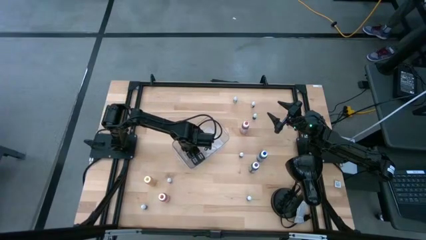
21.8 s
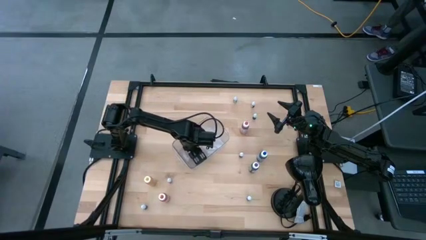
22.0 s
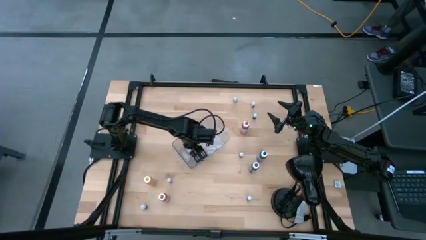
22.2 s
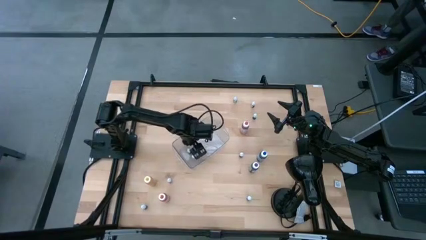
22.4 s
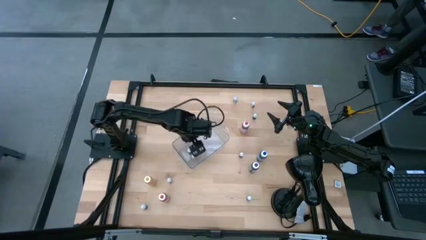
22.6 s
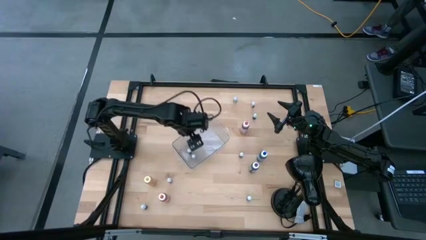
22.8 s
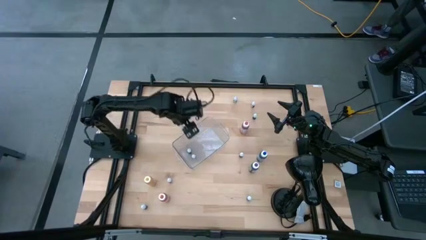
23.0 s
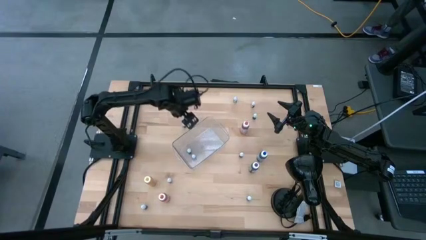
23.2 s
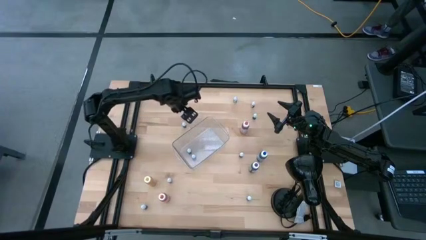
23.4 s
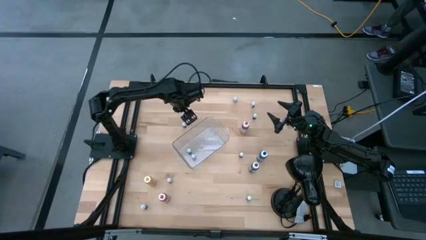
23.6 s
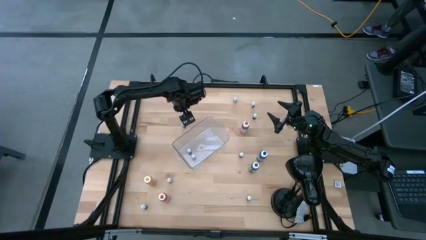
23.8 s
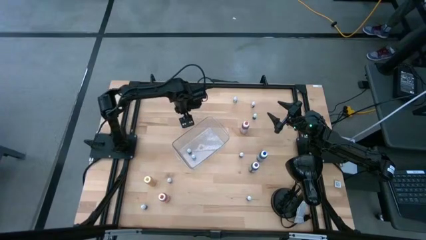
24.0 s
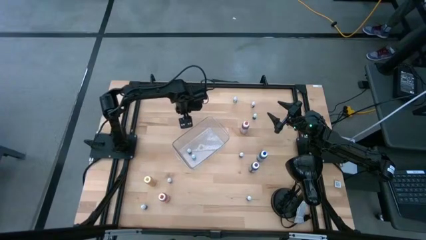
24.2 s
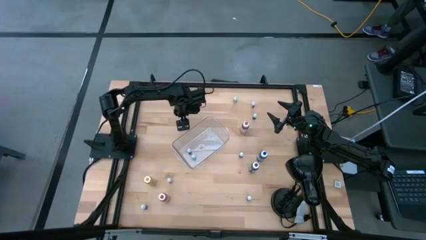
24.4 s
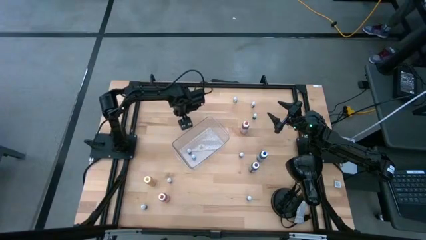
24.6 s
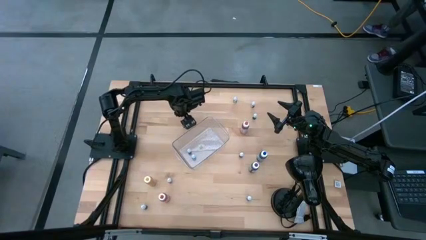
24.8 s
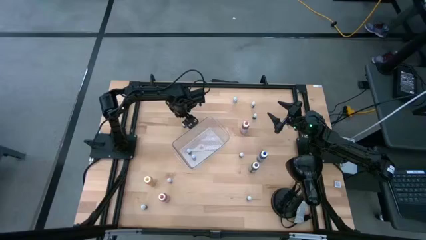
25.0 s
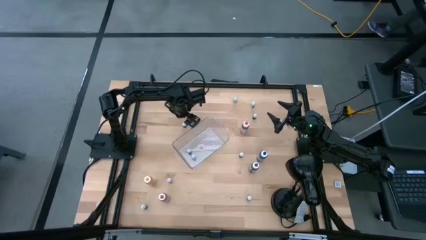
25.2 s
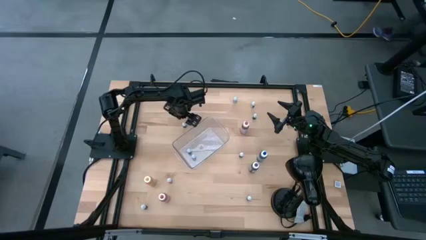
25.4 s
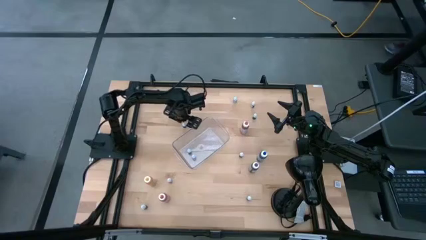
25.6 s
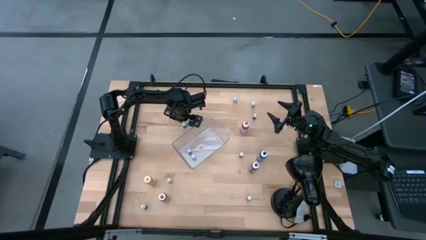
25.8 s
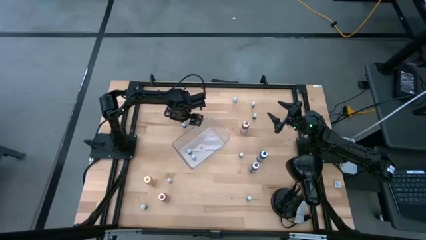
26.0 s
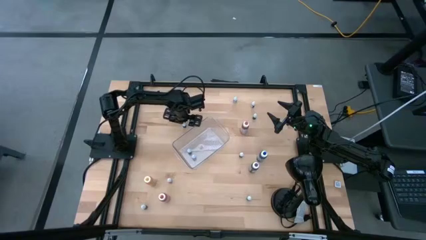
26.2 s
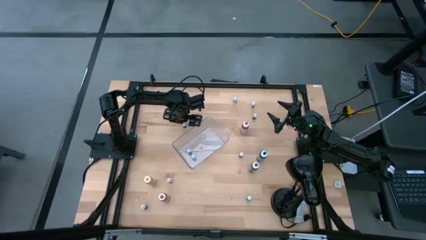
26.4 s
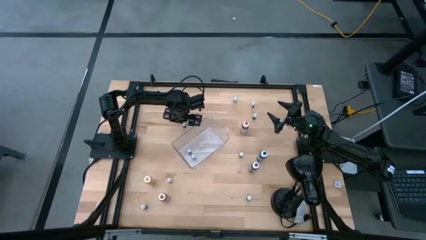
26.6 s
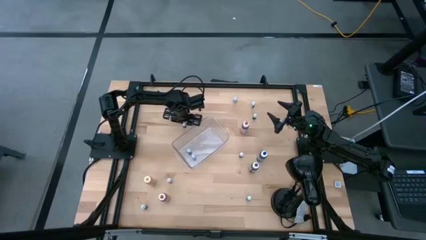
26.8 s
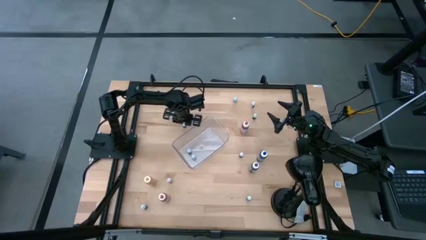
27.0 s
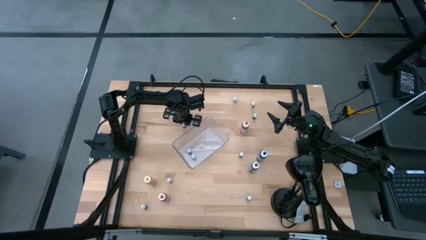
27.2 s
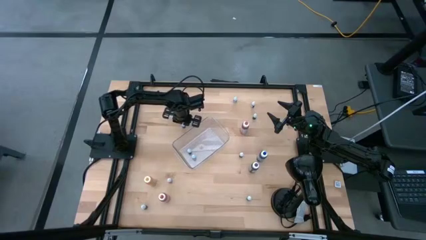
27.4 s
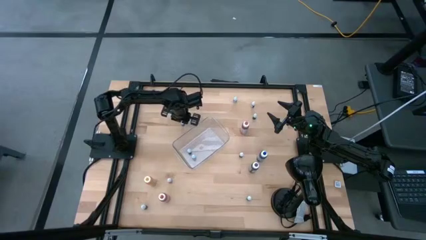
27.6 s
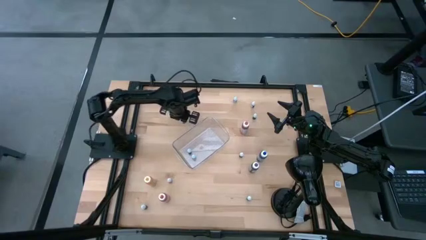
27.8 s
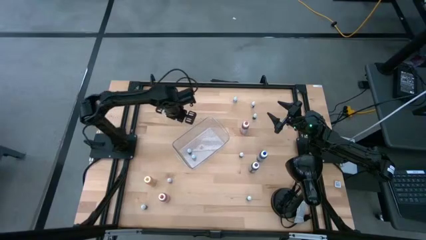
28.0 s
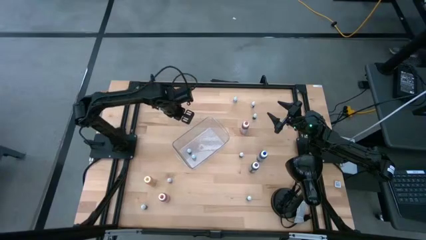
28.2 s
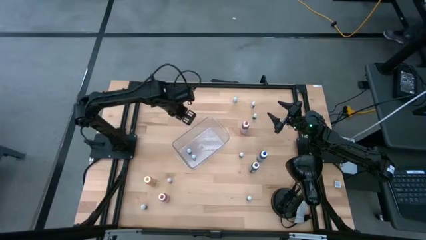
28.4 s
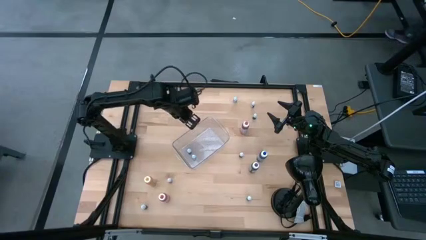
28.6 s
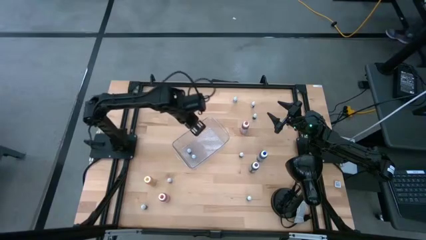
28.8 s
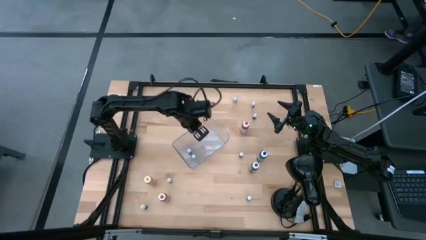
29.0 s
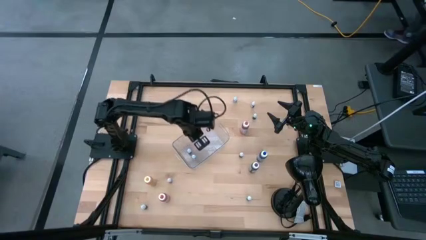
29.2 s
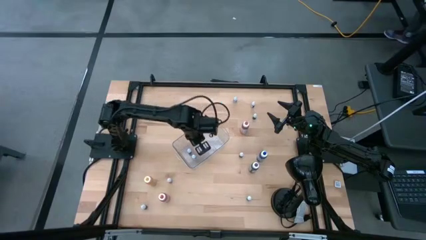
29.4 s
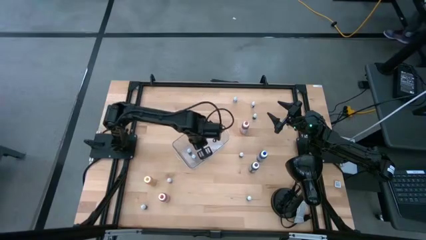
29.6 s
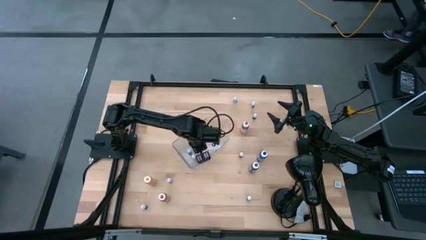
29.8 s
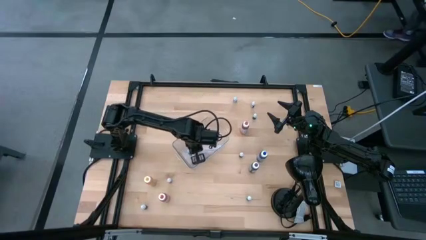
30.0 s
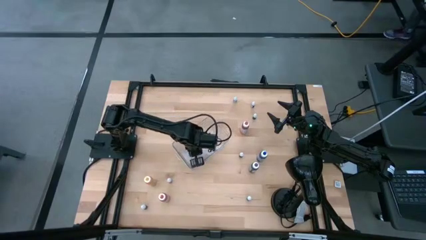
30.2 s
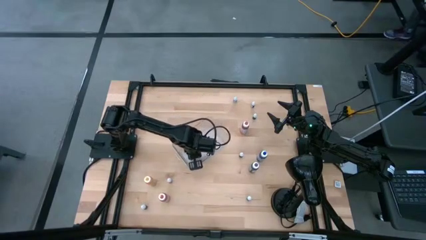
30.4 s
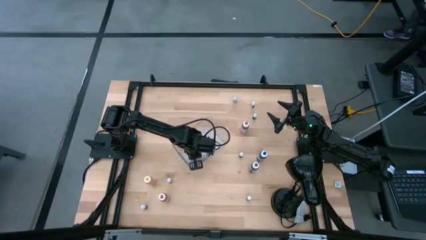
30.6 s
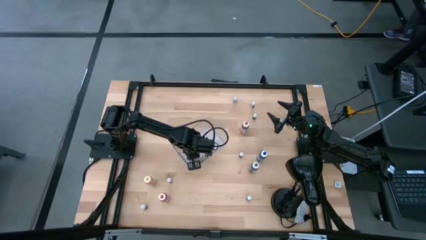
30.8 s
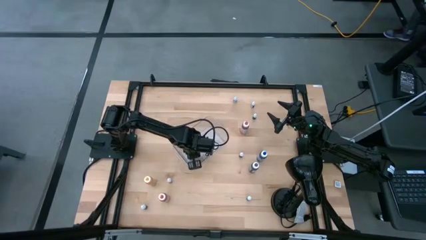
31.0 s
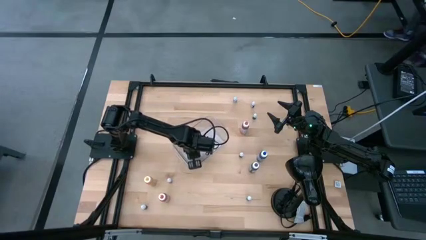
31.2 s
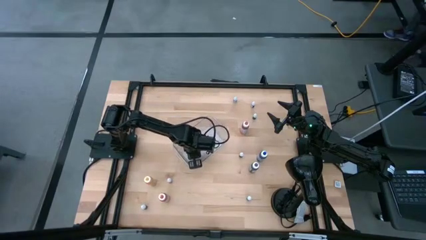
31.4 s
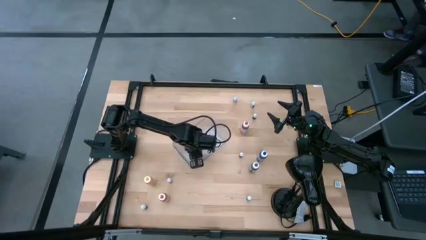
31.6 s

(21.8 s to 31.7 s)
Task: Pick & Place food coloring
Put the small red food coloring bottle into the transparent bin

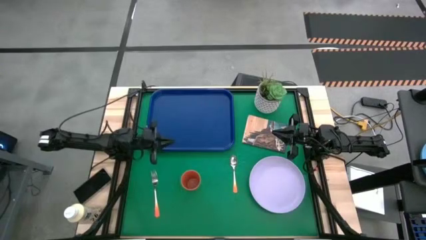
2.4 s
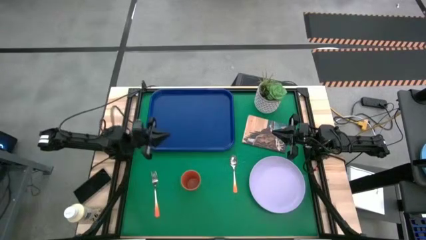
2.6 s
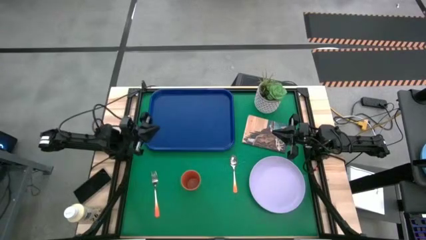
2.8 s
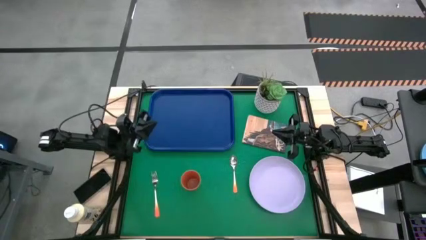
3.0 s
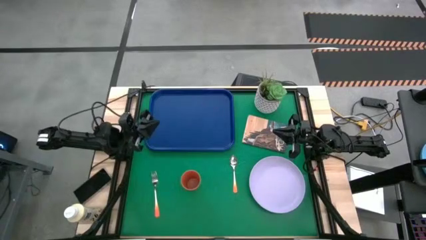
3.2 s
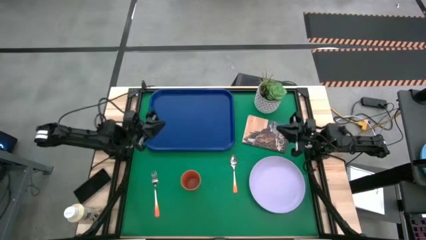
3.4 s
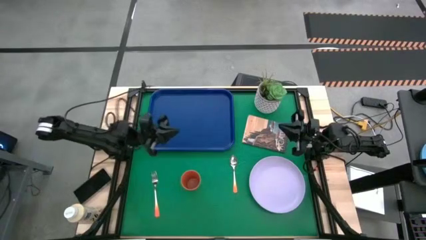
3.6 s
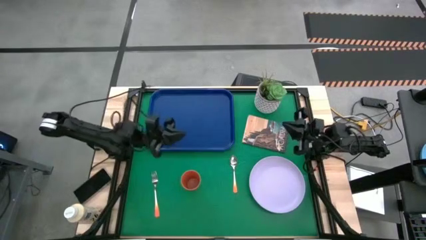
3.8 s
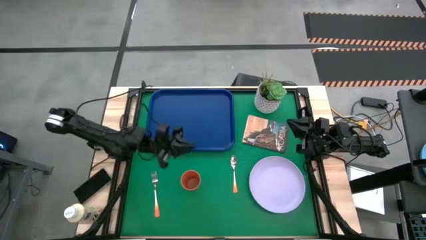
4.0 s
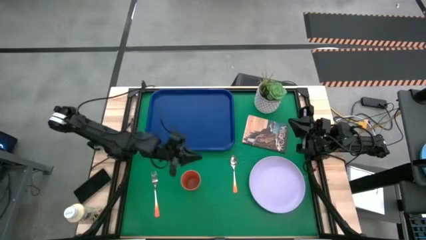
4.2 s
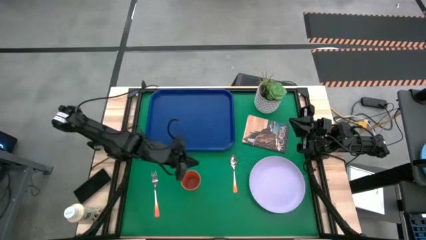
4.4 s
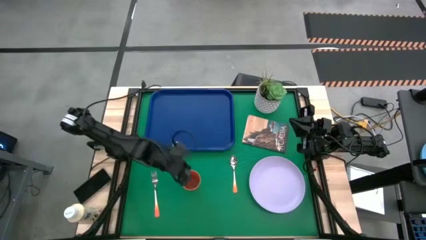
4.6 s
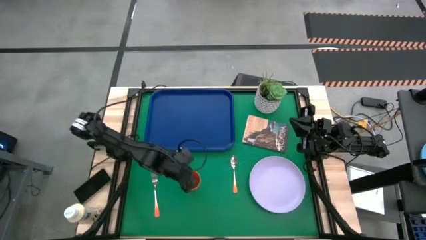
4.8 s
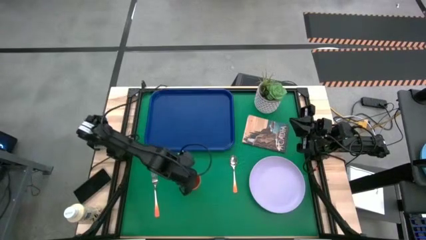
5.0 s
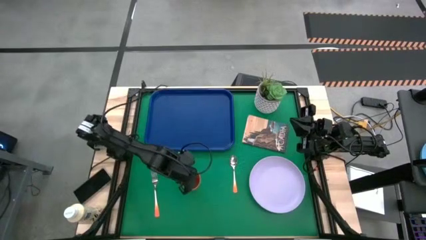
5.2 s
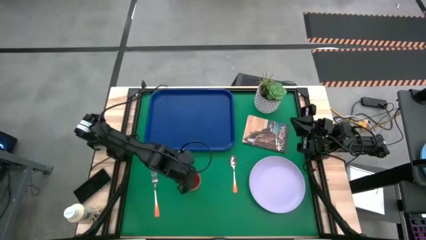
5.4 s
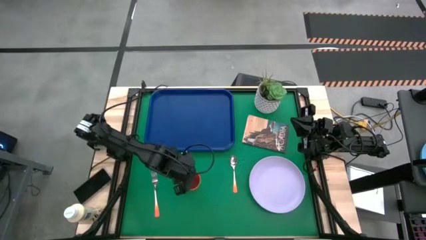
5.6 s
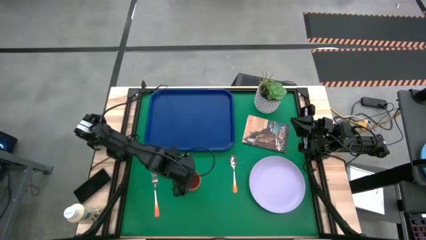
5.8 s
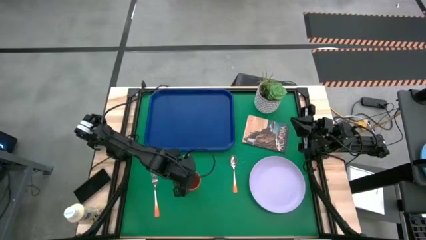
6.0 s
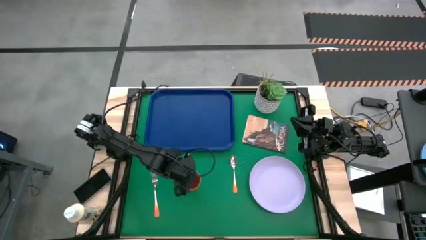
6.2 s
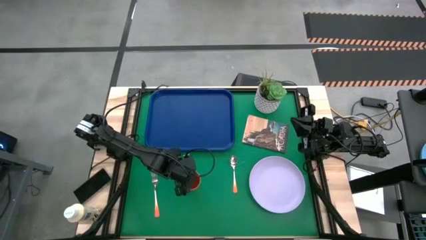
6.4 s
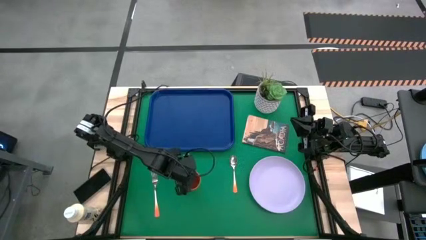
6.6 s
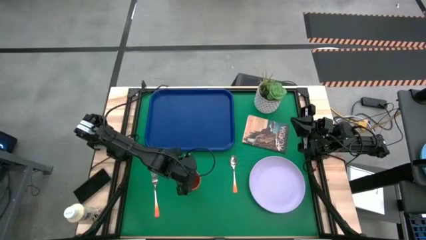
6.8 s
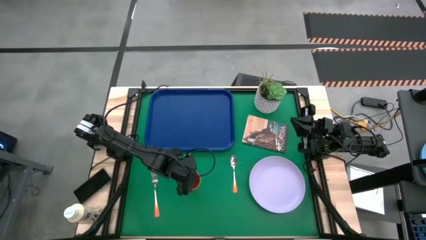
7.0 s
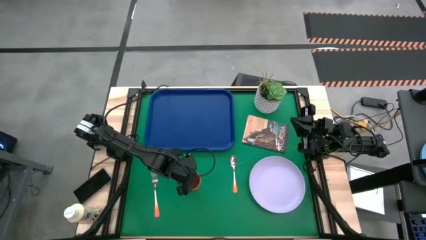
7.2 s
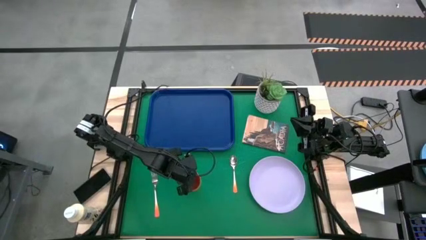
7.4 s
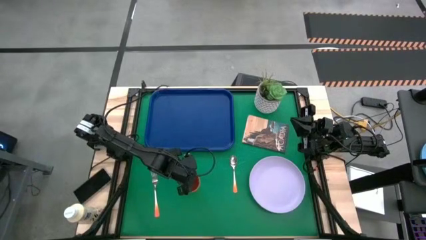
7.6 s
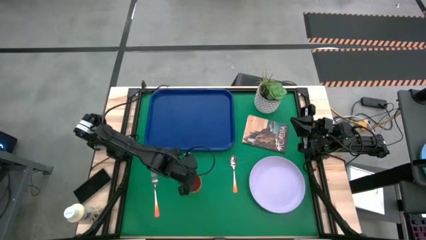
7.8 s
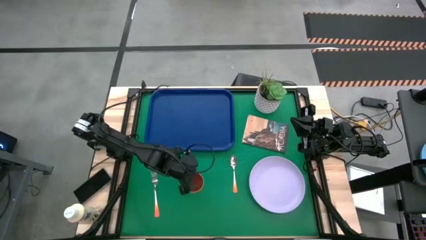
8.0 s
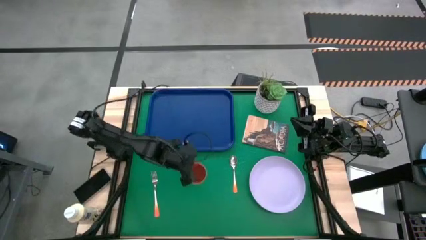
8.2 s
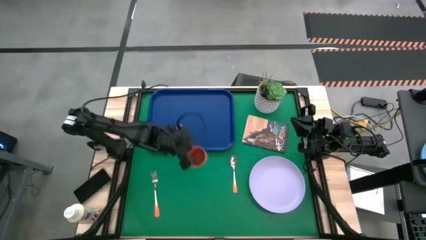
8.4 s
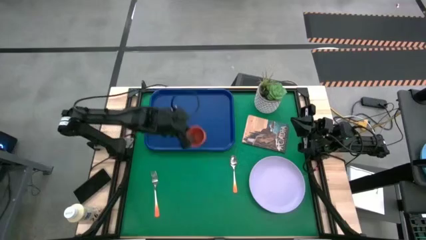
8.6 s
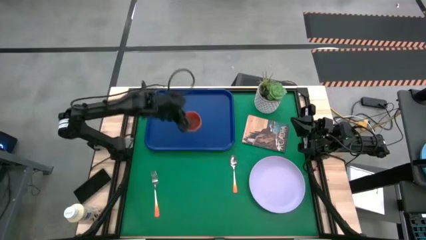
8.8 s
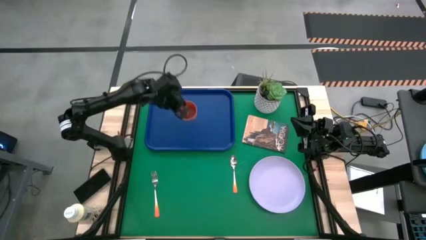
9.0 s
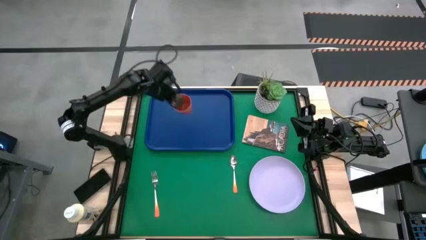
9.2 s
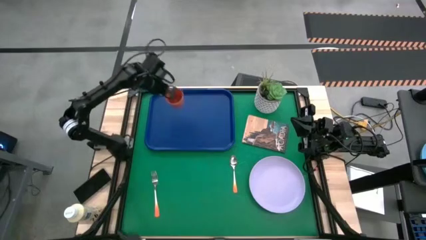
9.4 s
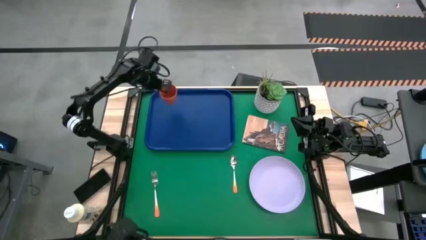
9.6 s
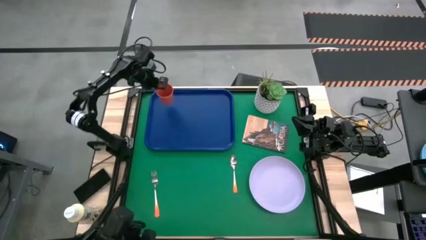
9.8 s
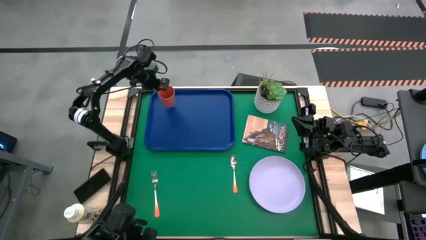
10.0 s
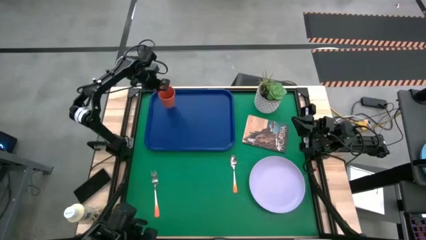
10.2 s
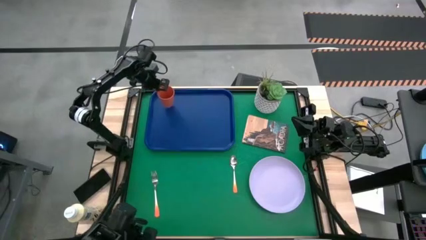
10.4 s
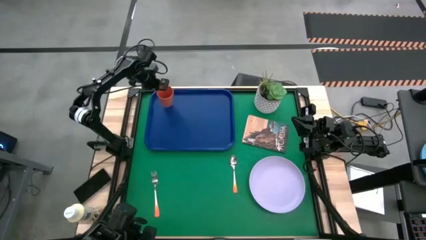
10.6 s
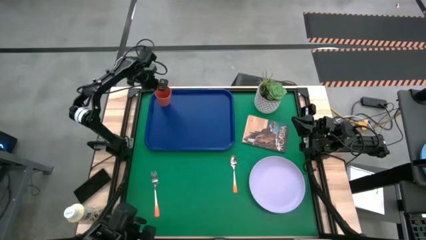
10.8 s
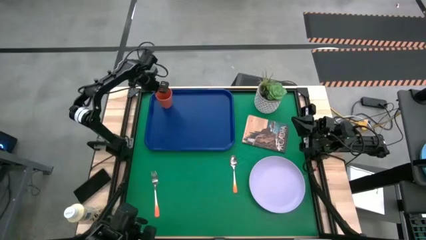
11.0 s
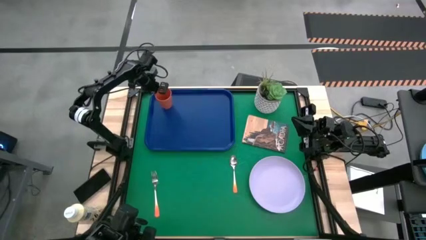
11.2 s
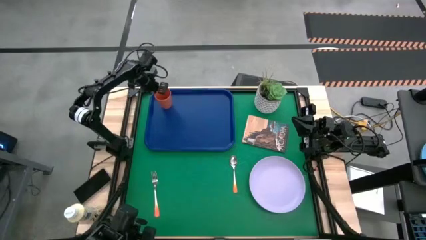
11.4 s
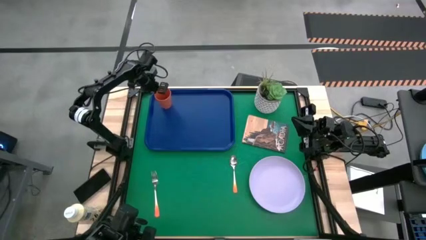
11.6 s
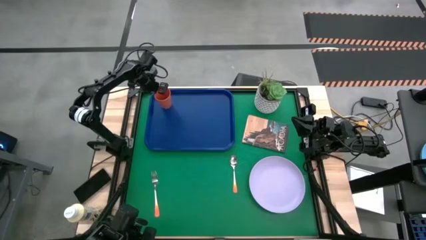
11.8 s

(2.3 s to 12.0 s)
Task: Pick and place plate/cup/fork/spoon on tray
Put the orange cup on the top right of the blue tray
